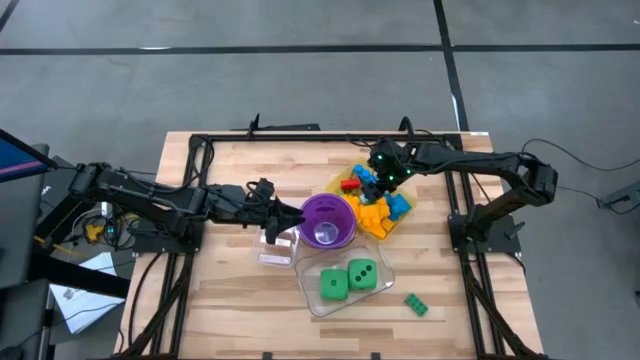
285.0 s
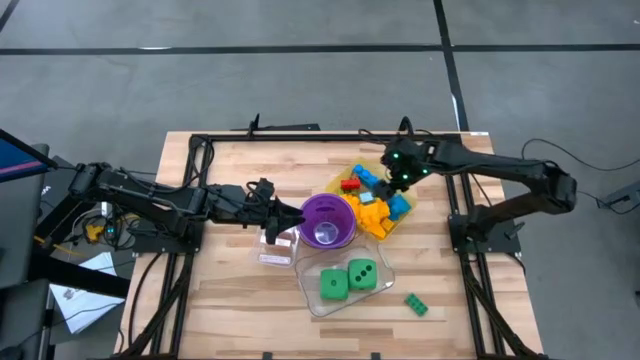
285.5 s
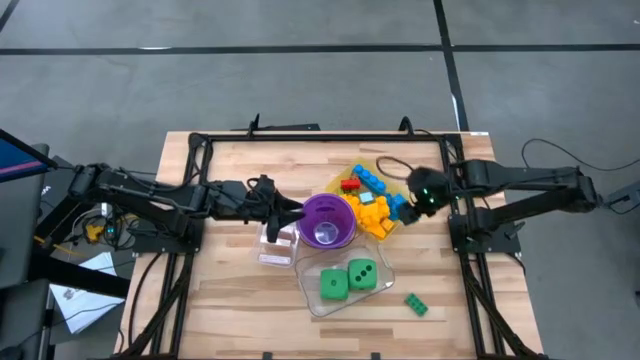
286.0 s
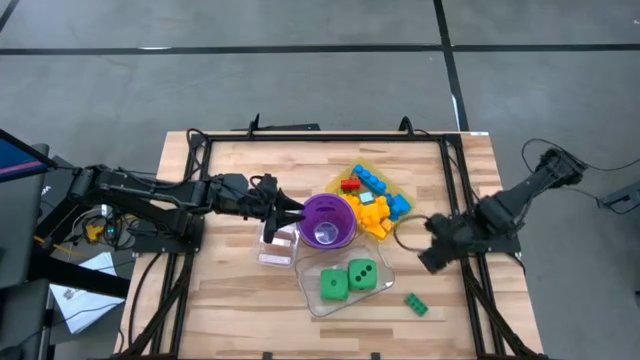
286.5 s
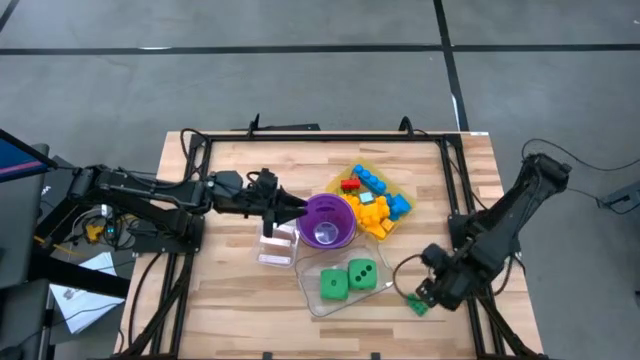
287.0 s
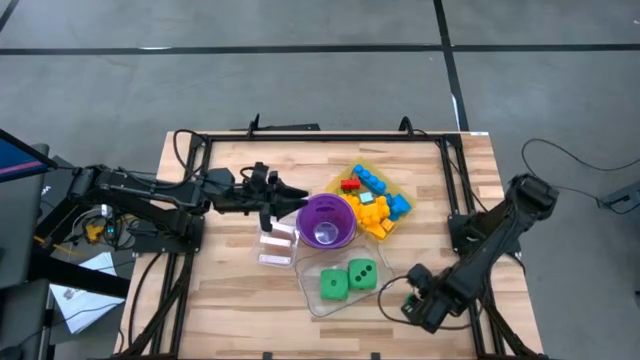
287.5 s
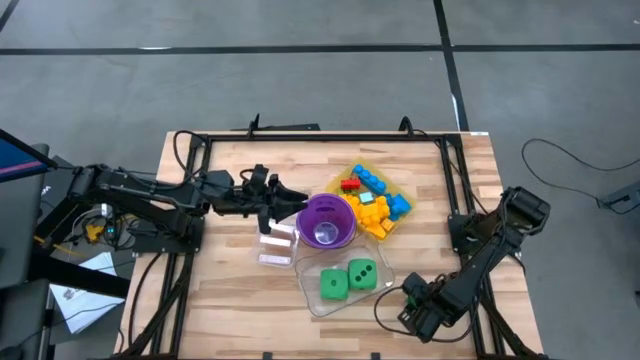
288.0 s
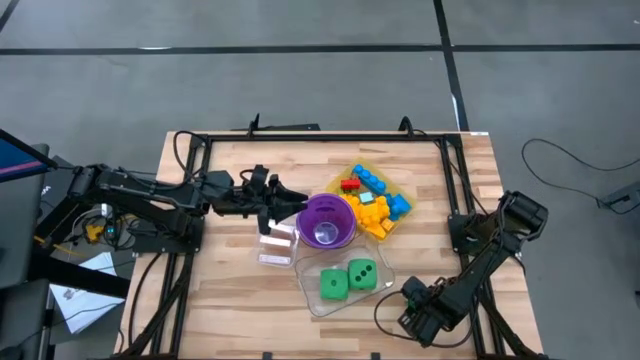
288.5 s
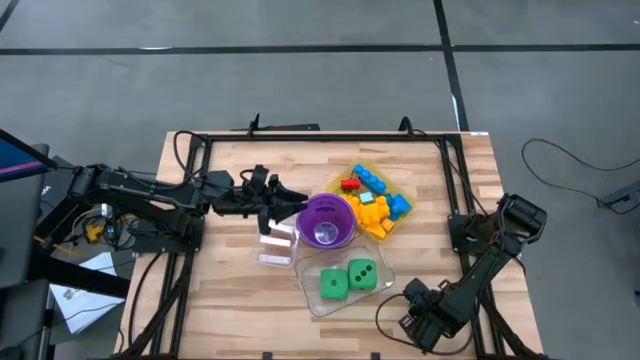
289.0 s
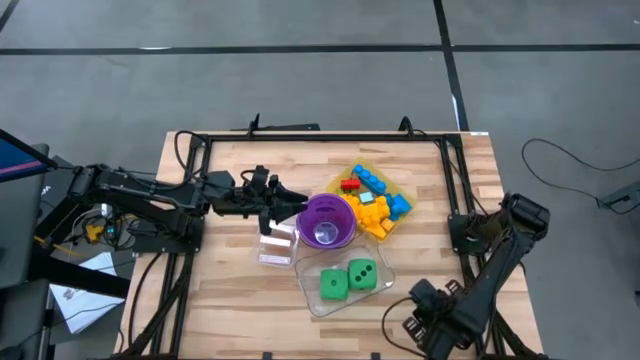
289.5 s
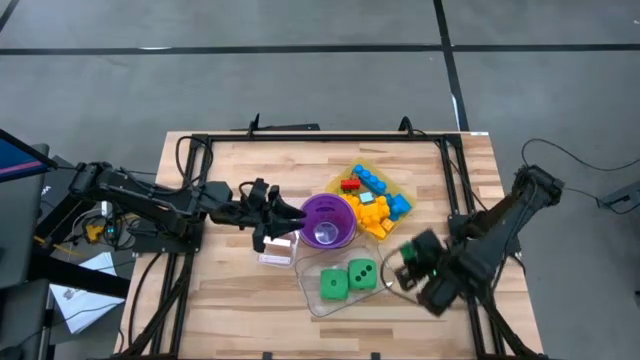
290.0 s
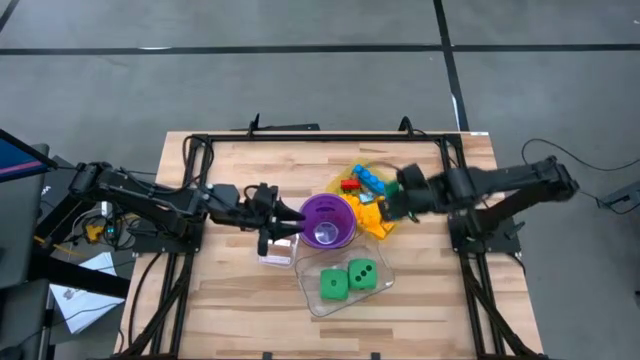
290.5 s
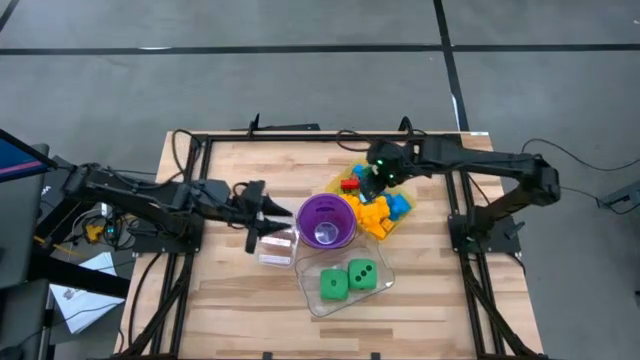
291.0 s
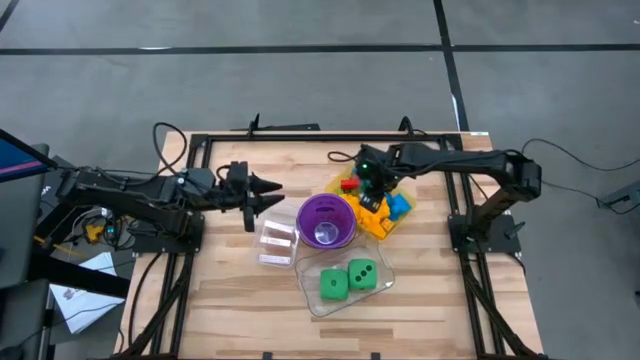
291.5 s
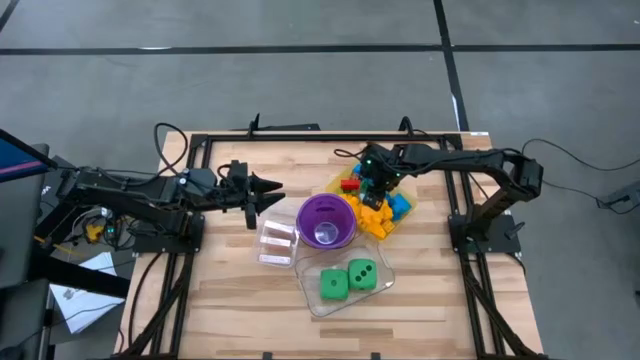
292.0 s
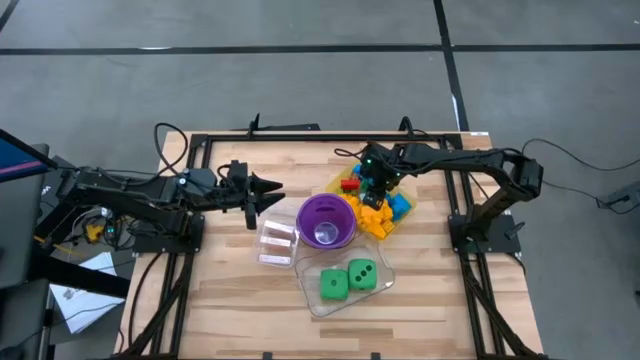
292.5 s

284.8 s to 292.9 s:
Task: Pick & Place Toys
Put the green game piece into the yellow bin

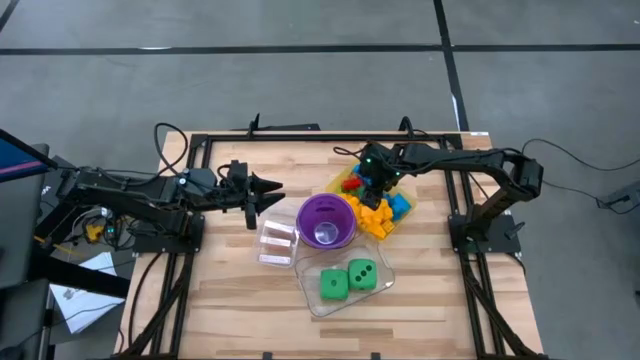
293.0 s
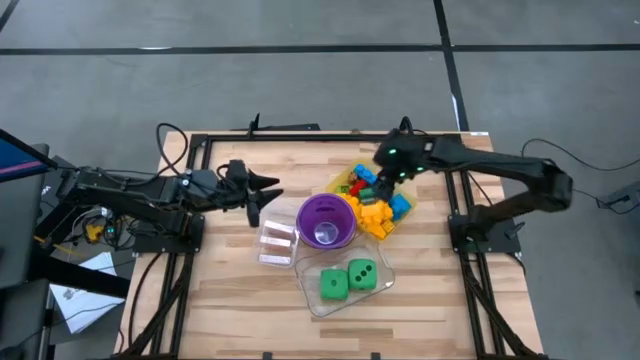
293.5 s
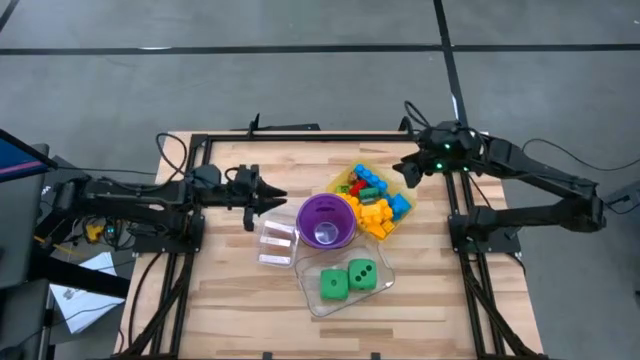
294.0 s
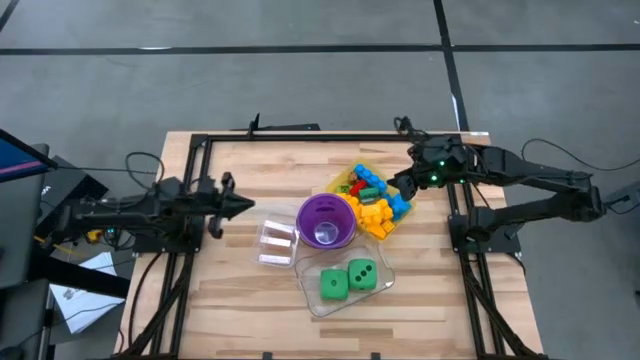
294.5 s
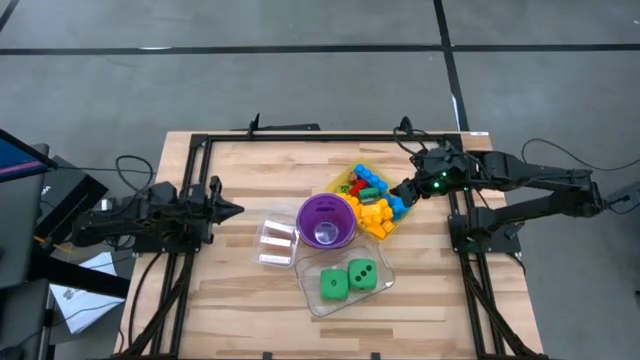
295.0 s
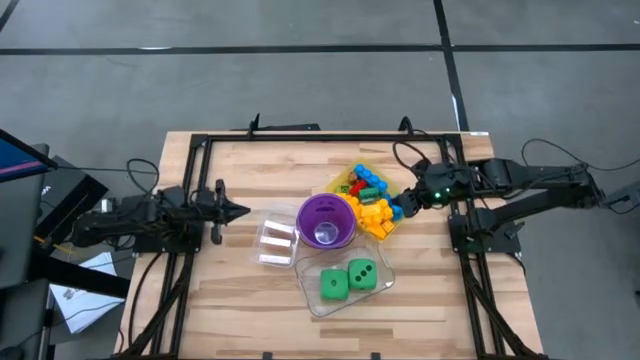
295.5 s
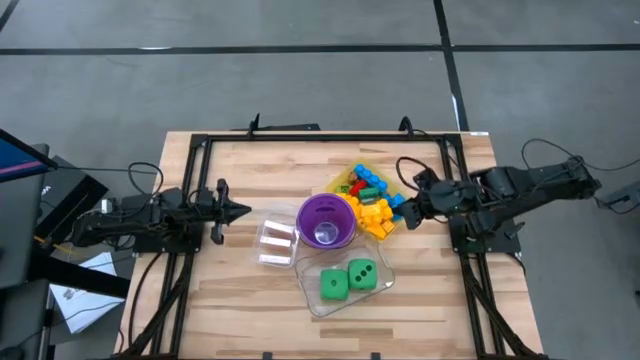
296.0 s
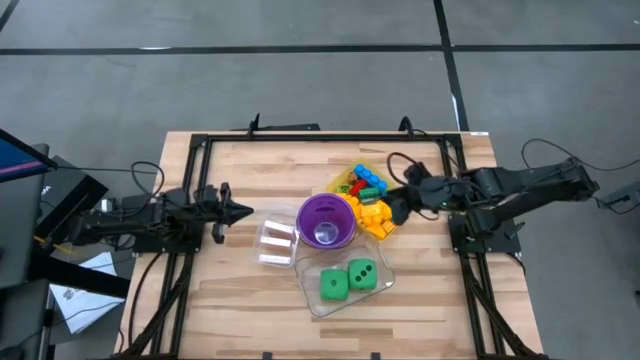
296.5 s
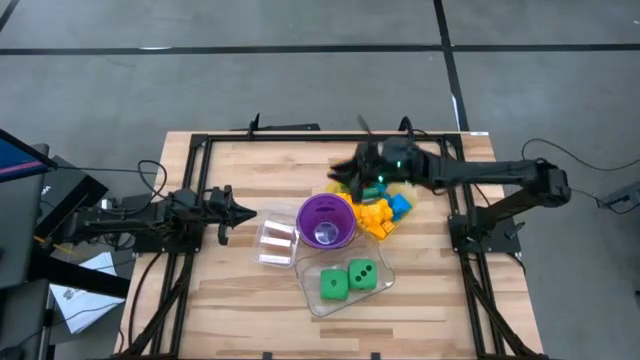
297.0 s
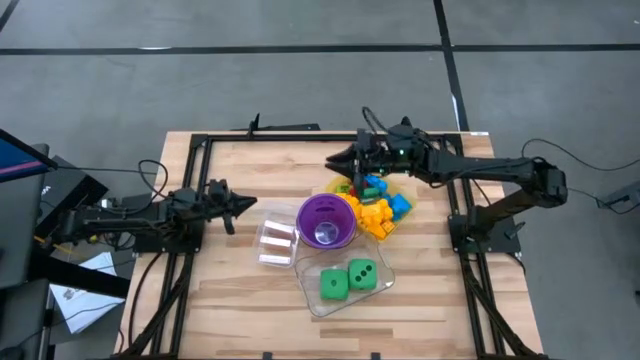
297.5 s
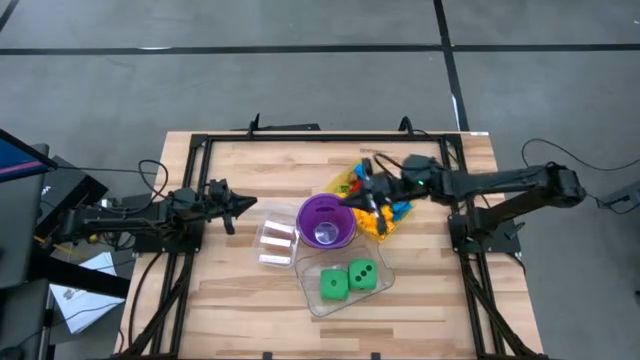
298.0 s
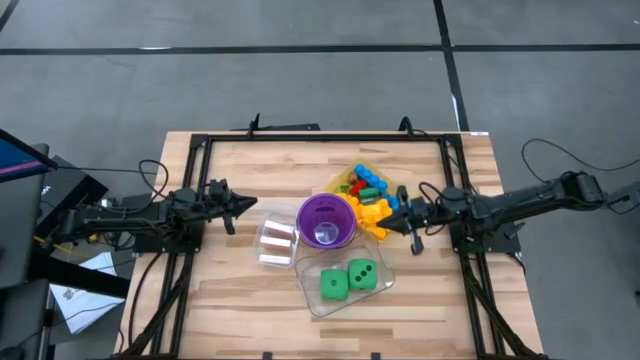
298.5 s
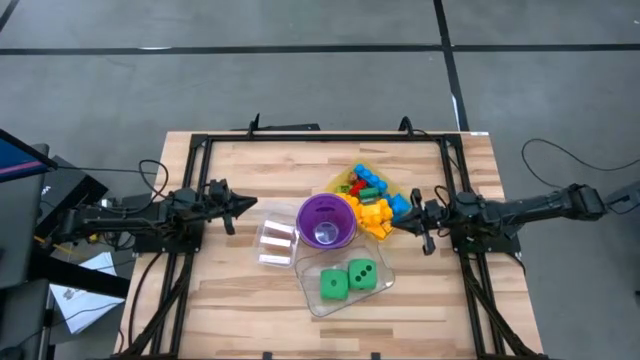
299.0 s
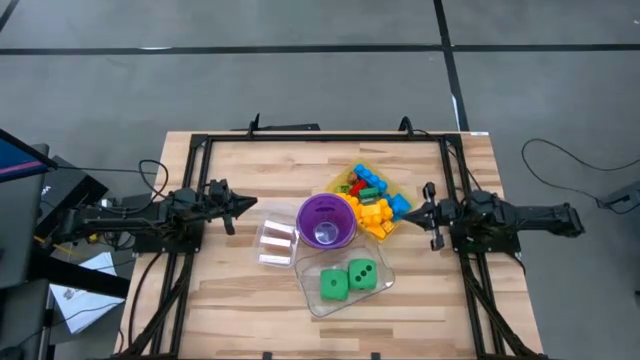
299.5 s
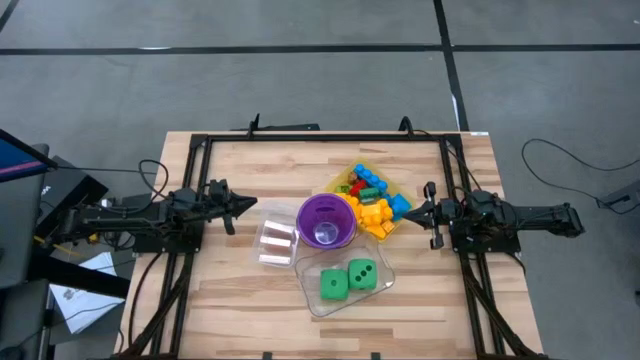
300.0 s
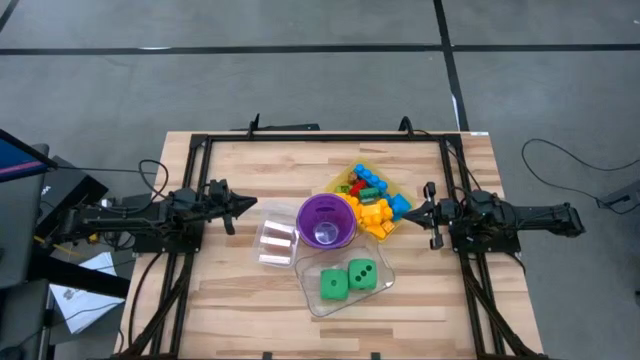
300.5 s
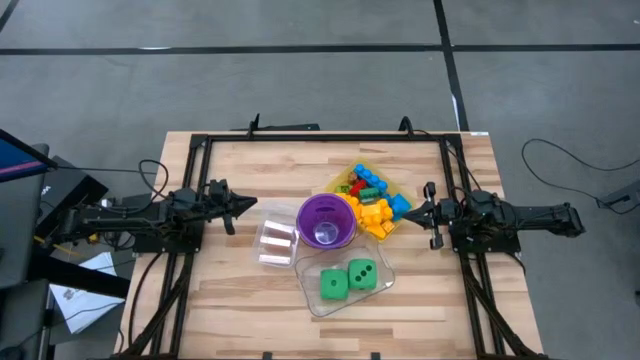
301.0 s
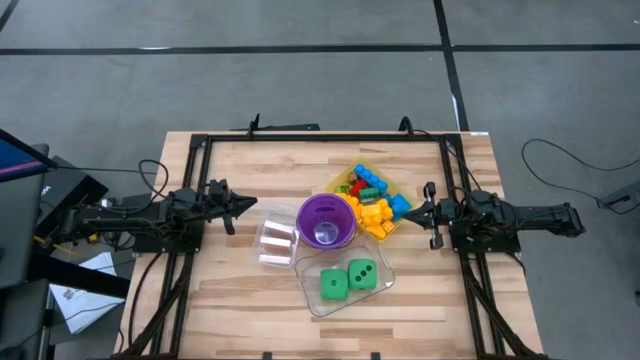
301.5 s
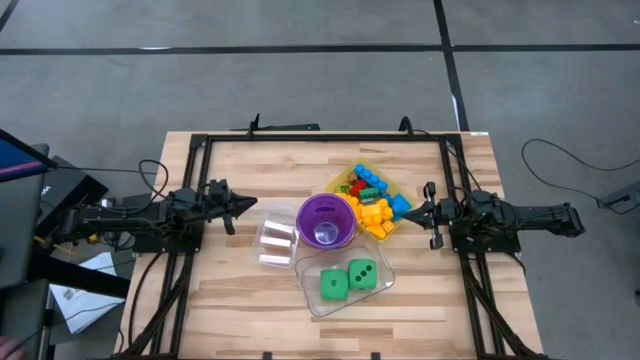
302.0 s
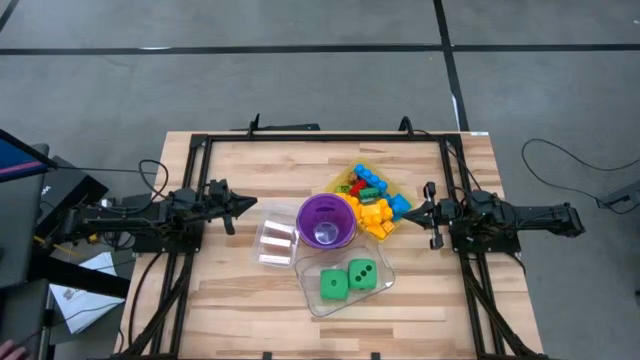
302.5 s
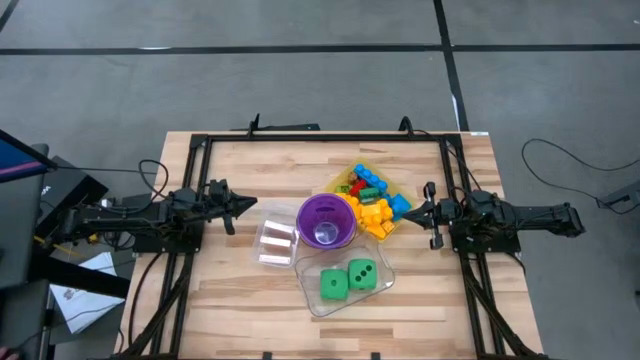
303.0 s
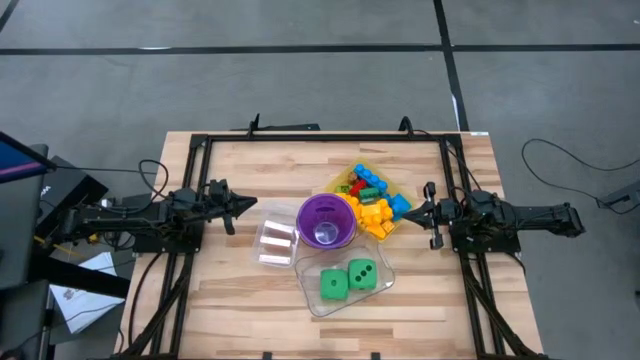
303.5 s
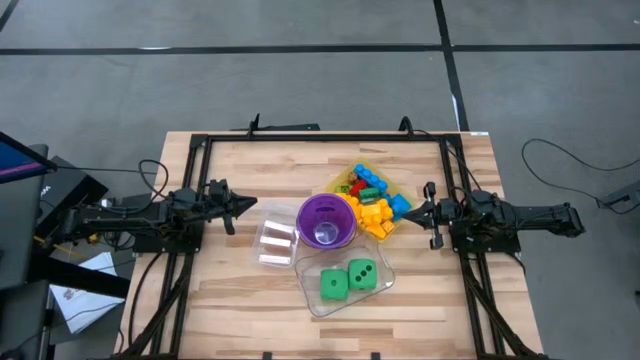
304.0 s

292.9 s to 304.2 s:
Return to Home Position
